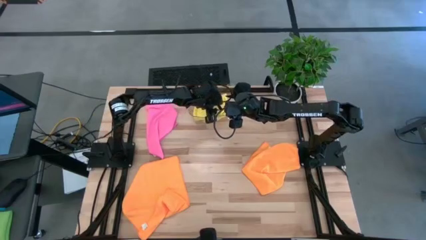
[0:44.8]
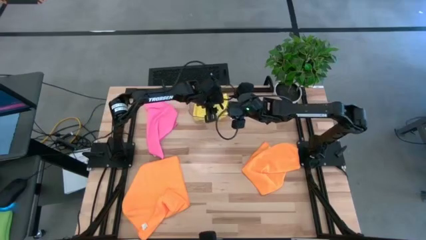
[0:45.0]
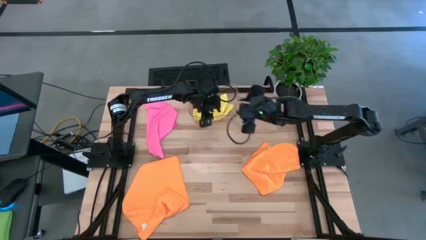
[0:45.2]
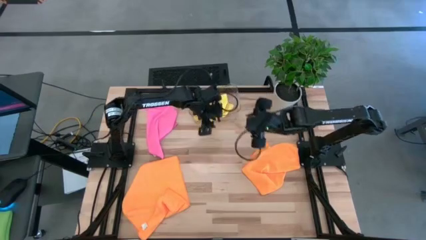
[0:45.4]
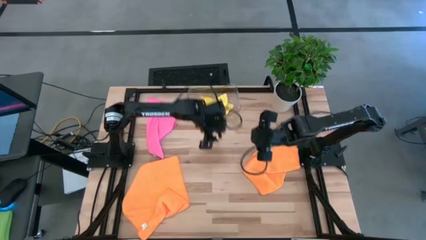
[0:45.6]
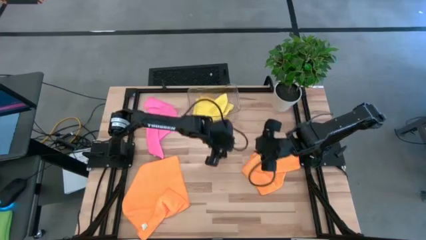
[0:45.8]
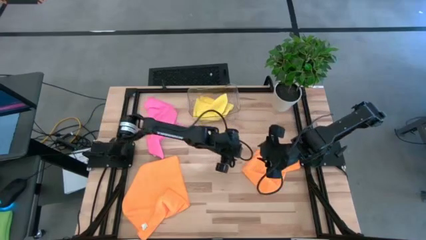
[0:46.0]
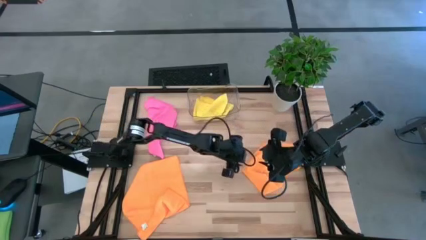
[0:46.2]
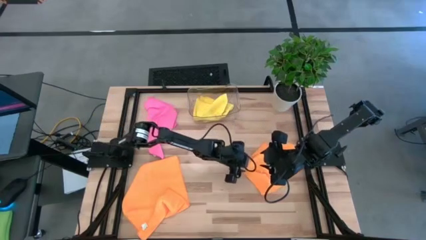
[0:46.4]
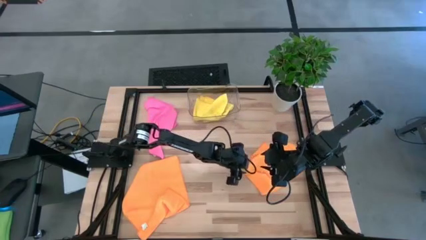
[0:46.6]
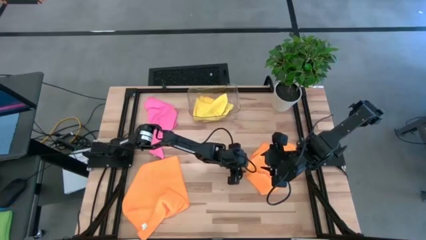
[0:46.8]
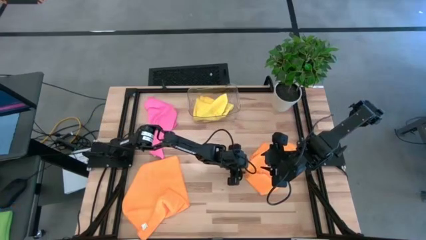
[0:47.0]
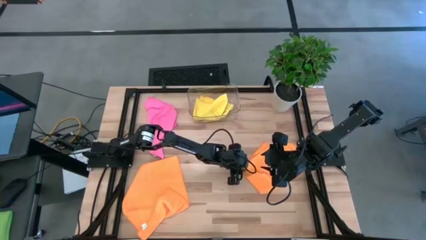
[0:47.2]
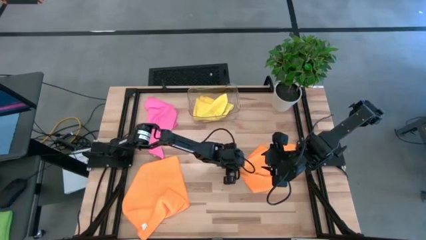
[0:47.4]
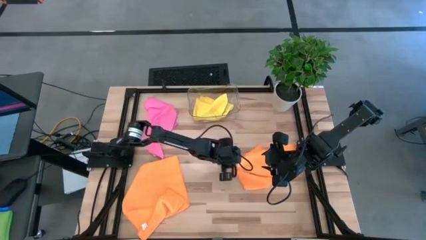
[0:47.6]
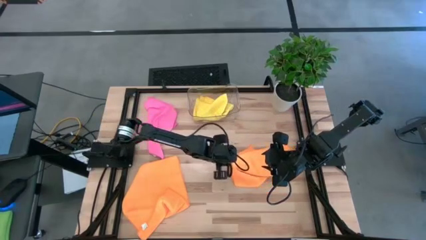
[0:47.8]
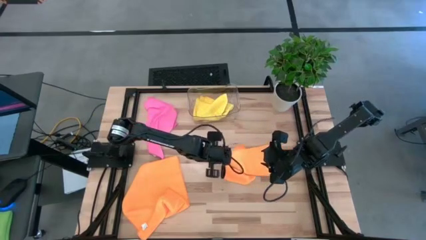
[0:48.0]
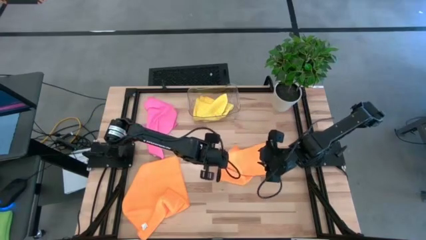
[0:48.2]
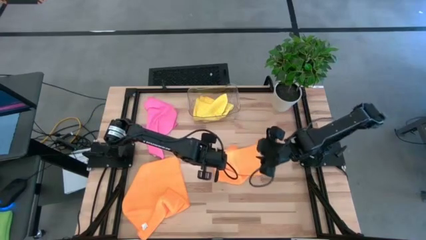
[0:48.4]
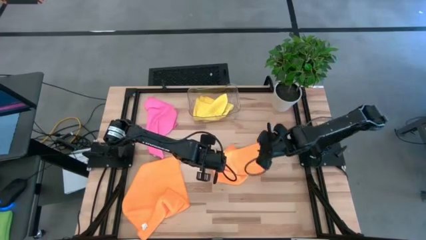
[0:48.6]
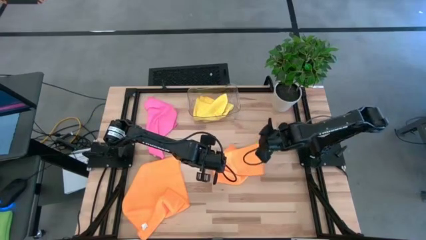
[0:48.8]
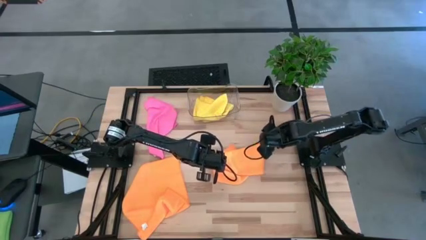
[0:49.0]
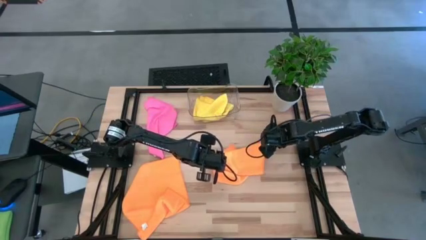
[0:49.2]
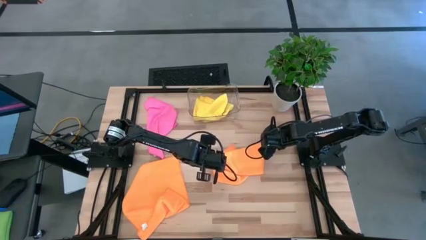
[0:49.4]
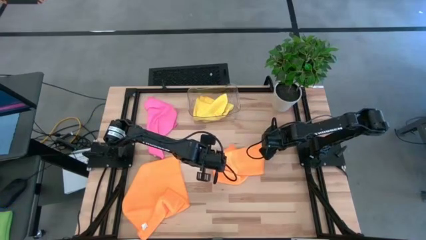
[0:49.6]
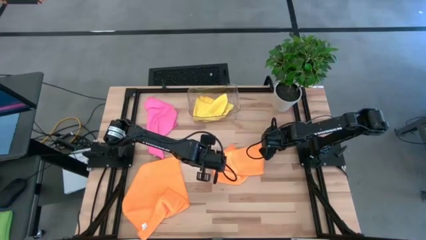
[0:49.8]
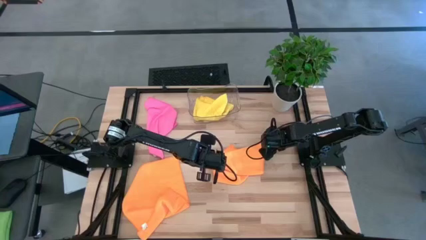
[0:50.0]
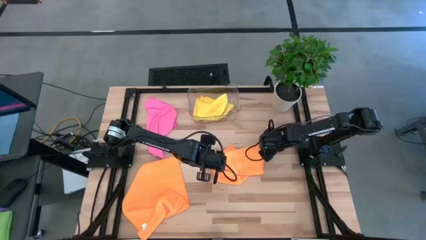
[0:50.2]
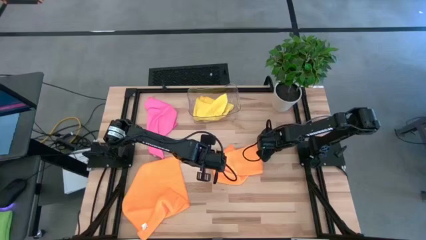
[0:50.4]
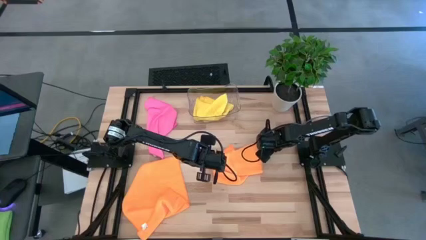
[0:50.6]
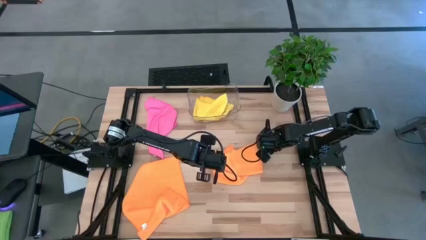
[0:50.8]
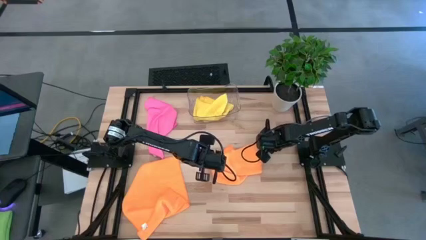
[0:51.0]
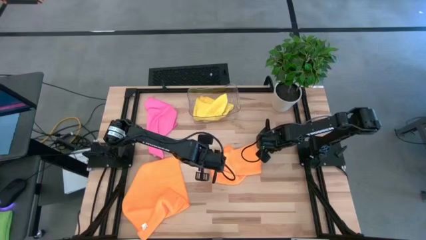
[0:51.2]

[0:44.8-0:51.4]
Task: Fold microfiber towels
Fold the right orange towel

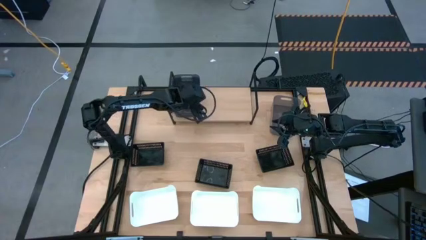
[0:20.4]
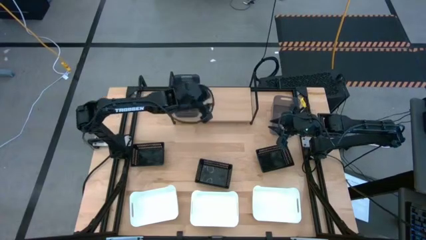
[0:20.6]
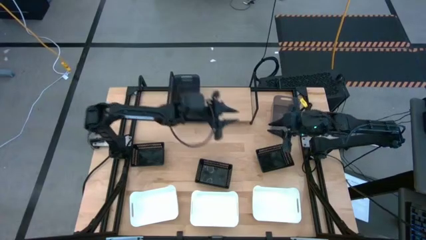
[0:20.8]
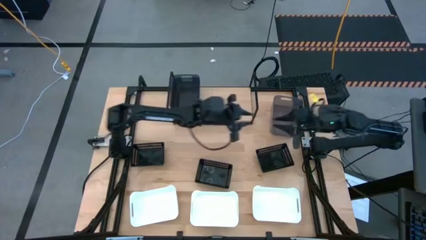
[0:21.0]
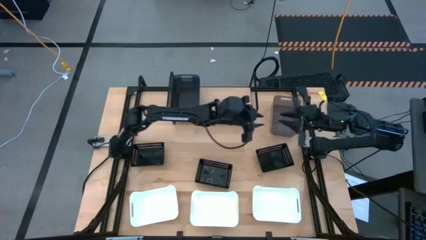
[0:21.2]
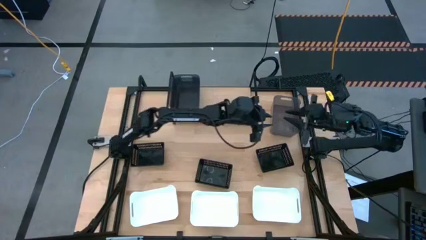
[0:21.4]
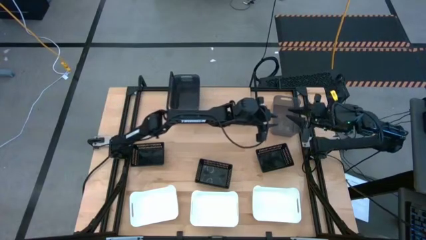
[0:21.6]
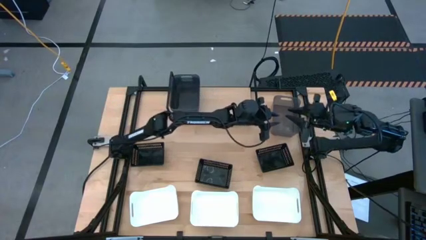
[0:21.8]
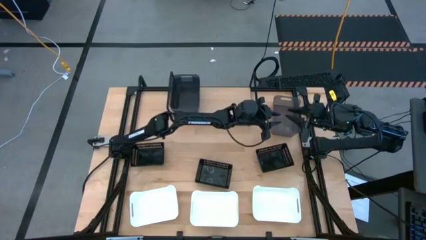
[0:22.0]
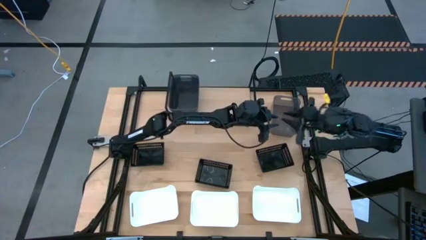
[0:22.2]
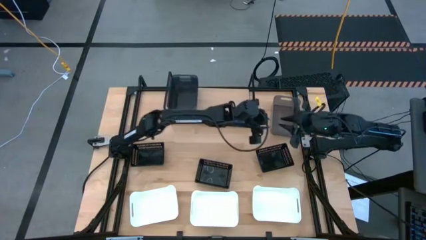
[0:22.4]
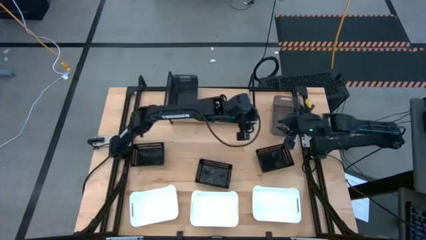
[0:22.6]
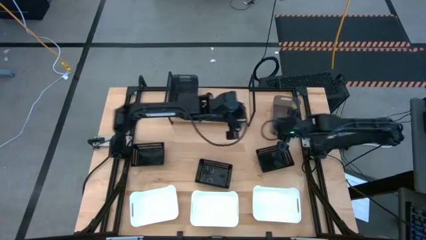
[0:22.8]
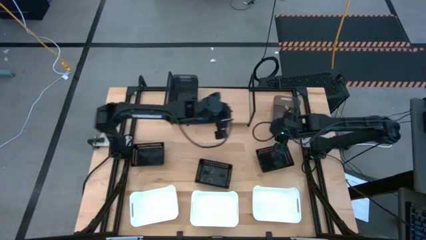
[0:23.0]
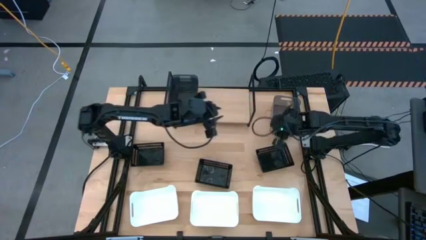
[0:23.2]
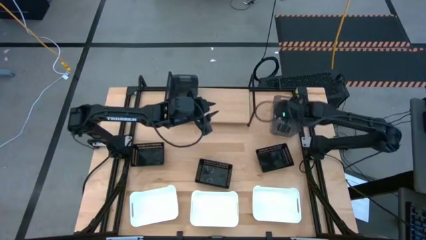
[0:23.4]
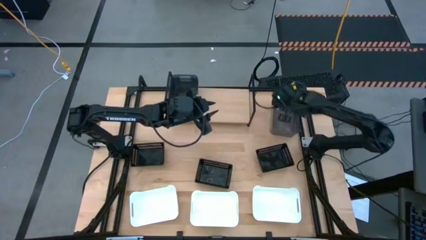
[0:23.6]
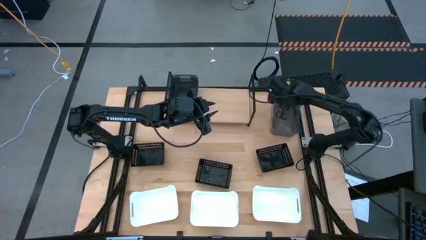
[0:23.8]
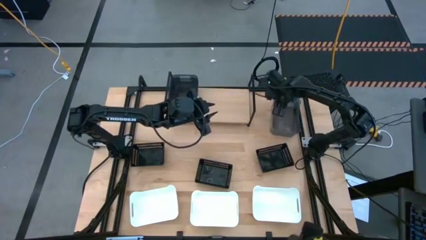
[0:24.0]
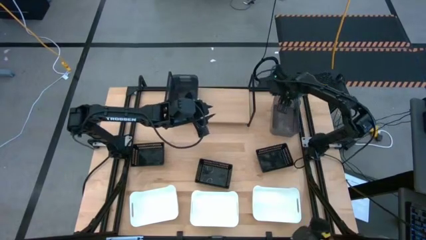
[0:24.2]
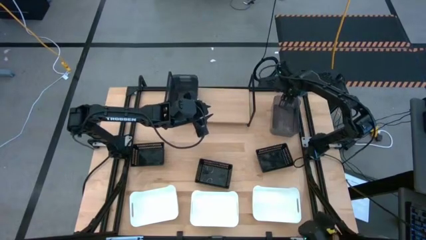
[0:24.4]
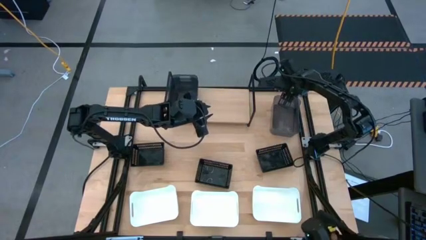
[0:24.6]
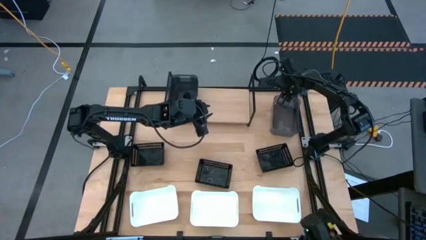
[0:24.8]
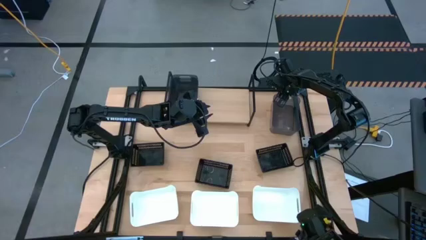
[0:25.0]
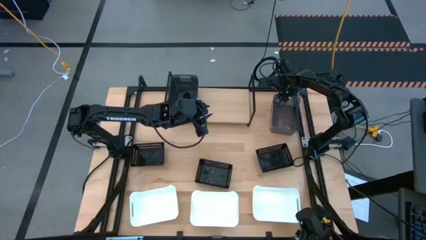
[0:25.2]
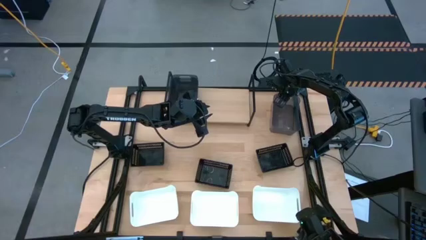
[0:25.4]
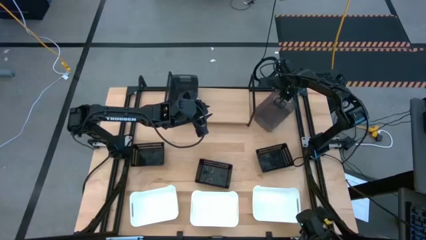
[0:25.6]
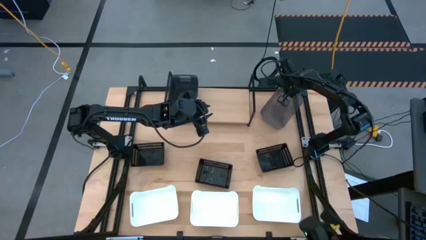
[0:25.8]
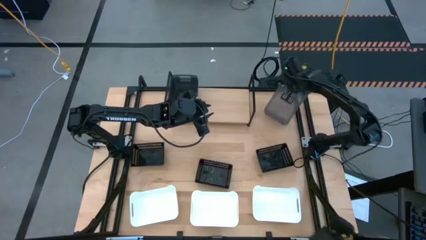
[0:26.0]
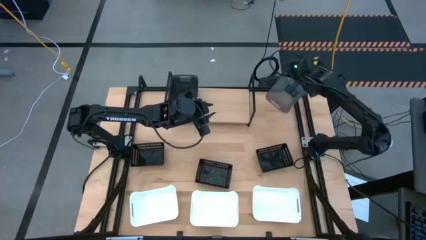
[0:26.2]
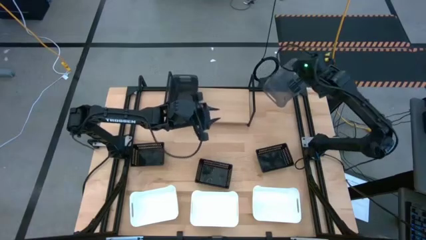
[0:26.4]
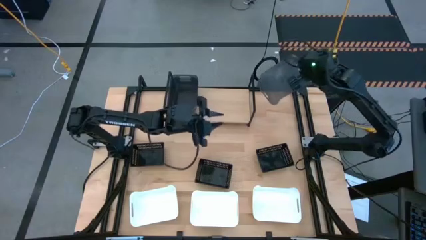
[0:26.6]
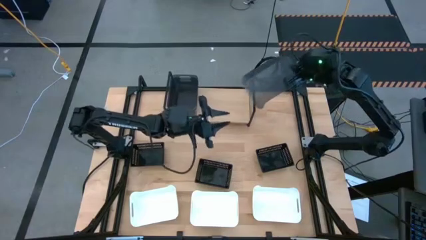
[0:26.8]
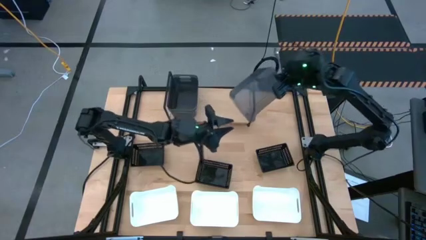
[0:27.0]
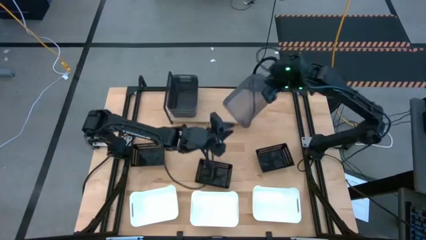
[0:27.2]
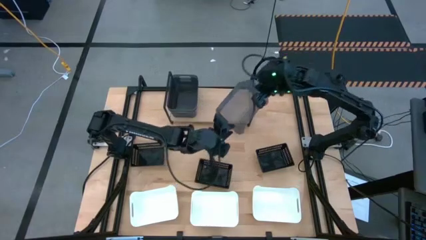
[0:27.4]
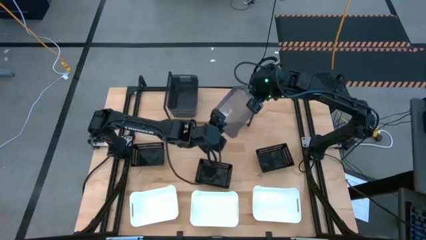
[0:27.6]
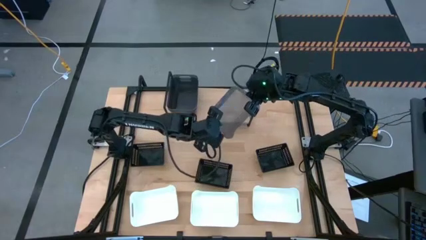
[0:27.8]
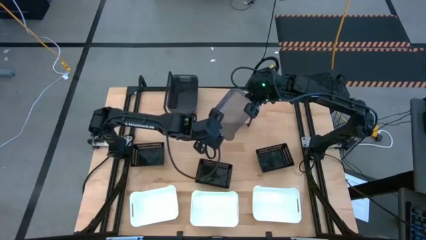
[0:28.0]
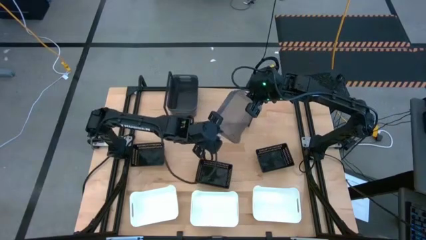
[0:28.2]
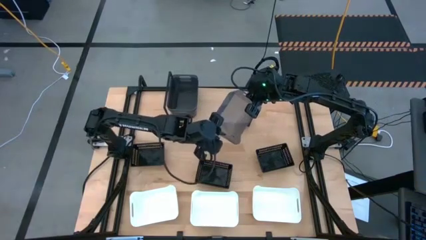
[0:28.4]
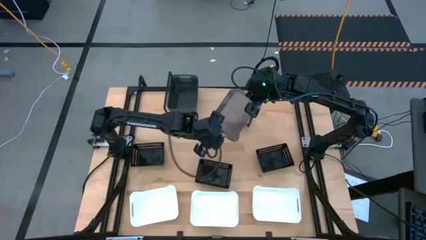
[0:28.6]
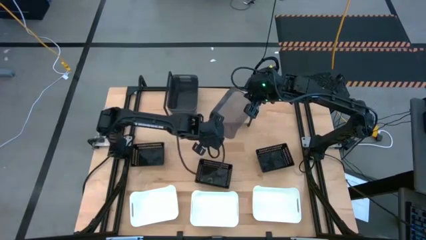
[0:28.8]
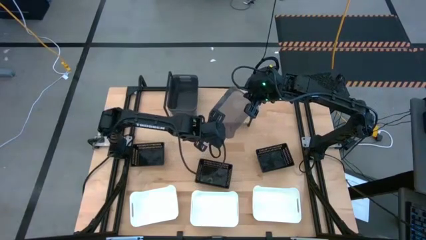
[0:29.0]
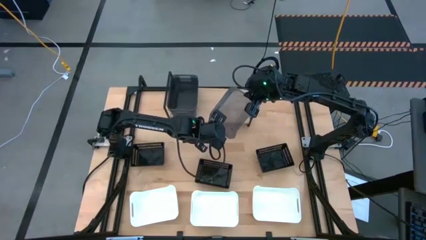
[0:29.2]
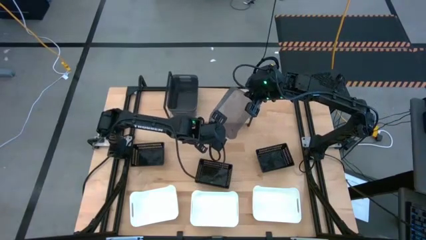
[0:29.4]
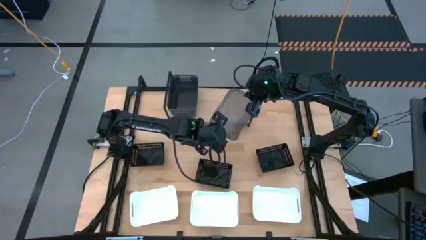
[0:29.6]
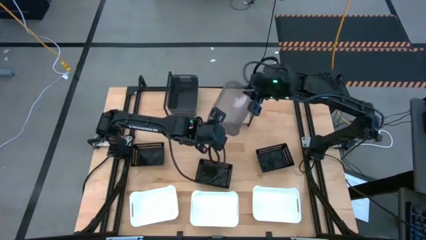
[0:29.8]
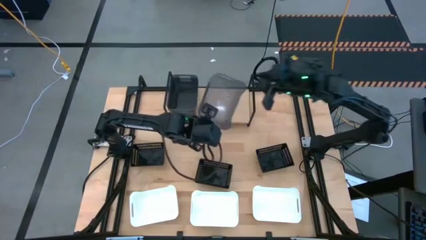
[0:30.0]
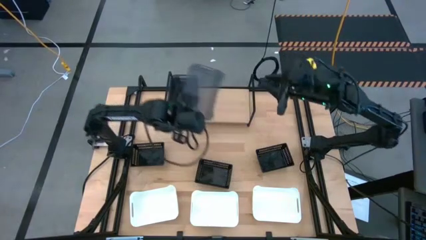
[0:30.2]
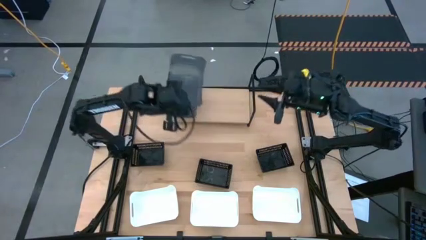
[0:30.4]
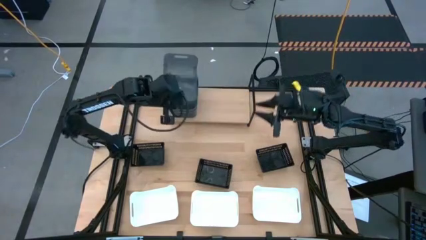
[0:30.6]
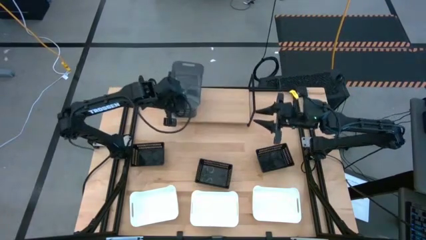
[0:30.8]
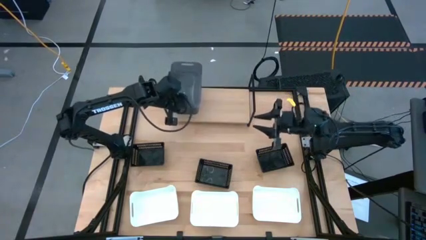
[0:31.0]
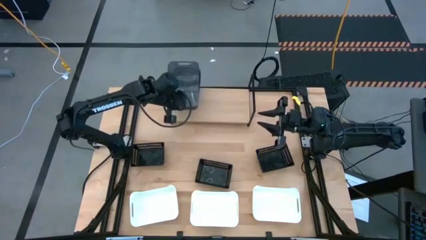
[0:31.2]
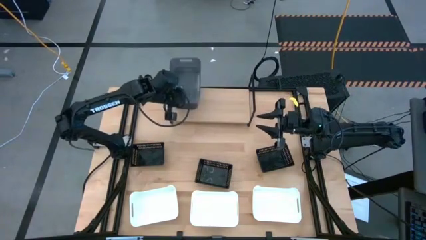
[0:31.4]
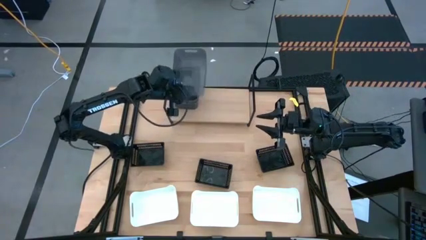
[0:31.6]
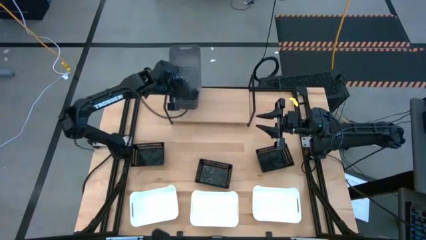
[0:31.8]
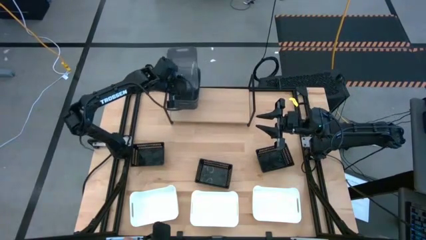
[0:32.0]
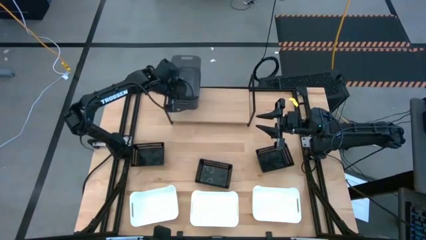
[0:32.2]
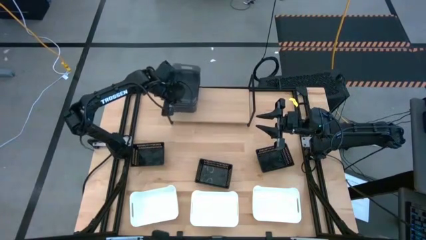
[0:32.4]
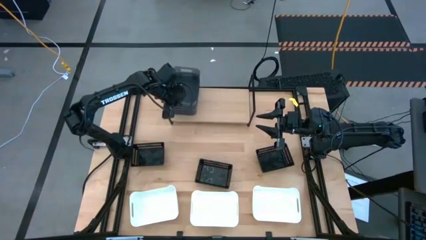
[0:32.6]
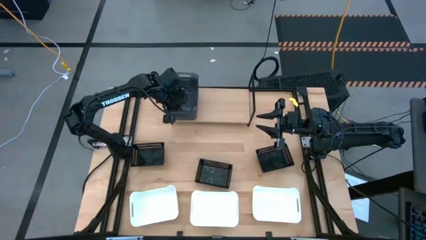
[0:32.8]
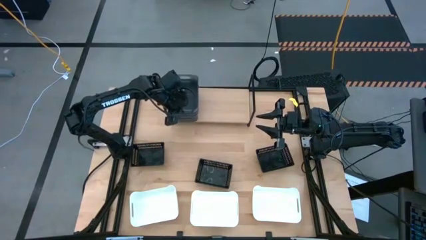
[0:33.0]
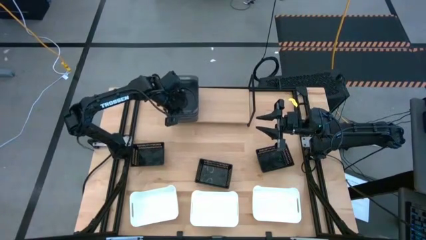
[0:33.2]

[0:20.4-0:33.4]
Task: Stack baskets on shelf by color
Stack the gray bin on top of the gray bin
